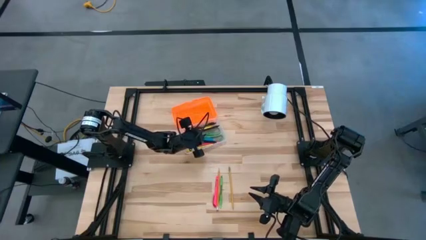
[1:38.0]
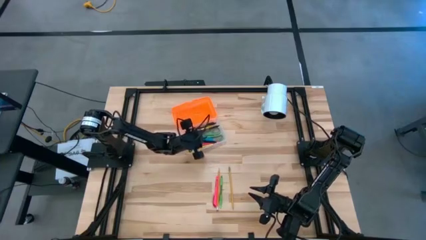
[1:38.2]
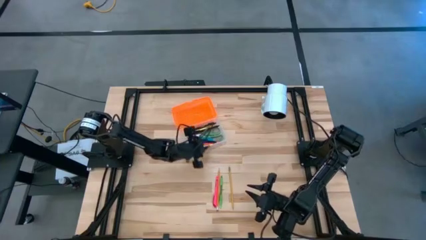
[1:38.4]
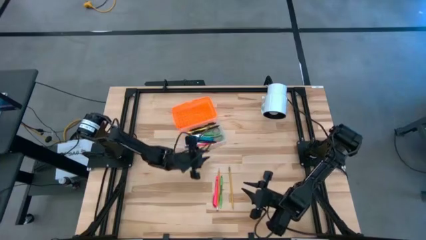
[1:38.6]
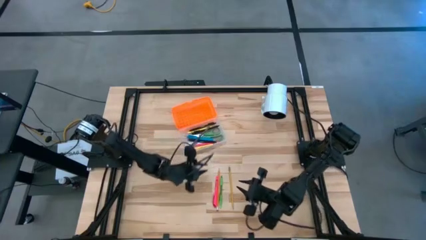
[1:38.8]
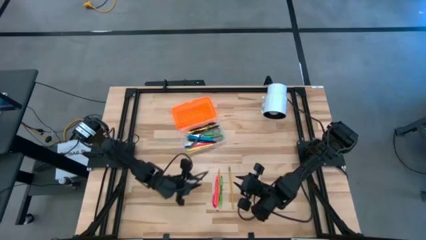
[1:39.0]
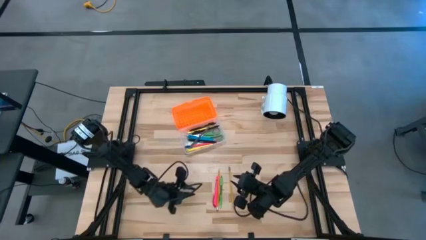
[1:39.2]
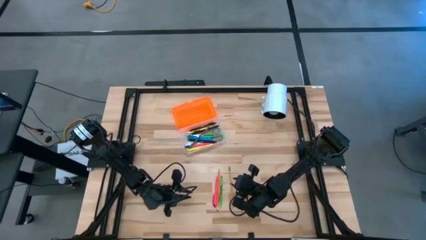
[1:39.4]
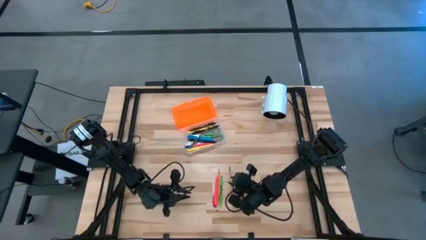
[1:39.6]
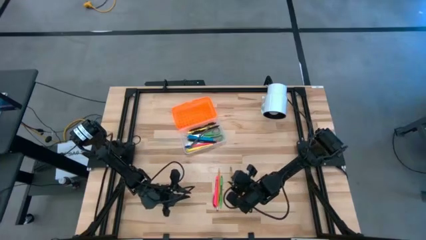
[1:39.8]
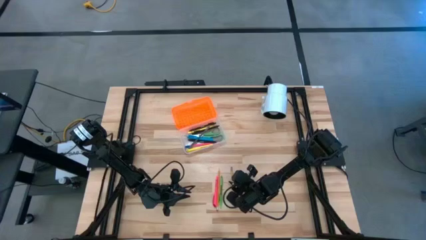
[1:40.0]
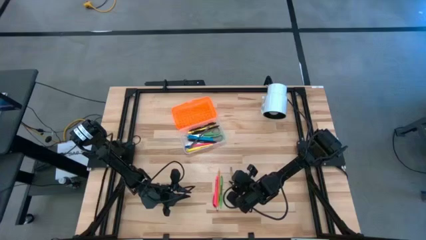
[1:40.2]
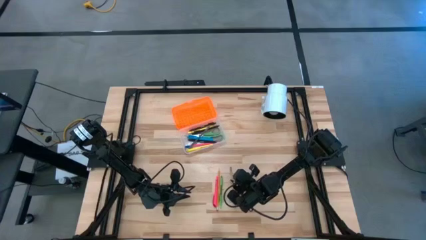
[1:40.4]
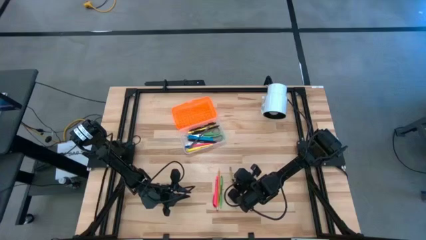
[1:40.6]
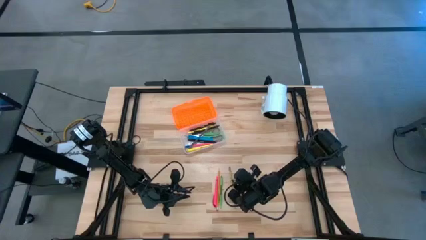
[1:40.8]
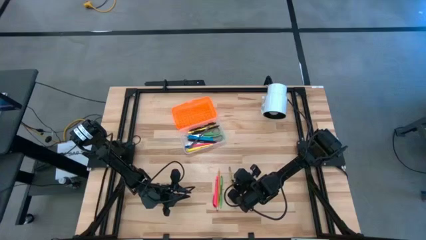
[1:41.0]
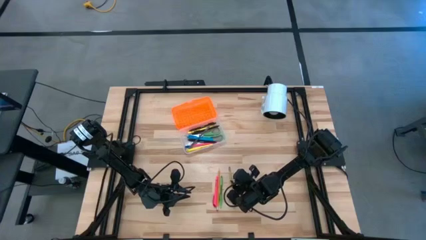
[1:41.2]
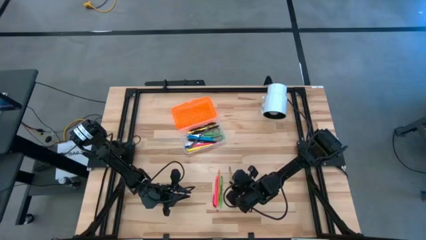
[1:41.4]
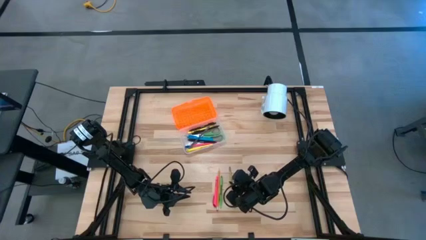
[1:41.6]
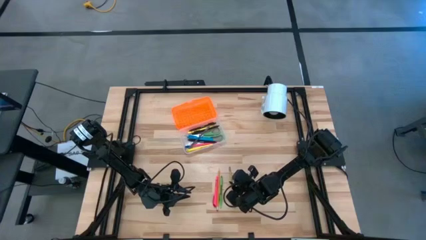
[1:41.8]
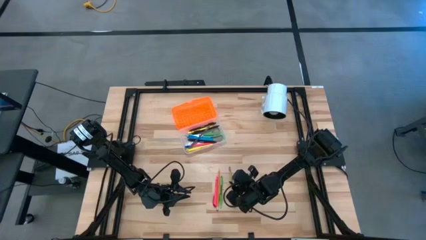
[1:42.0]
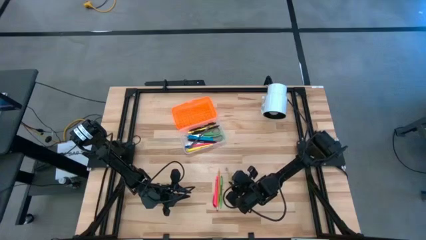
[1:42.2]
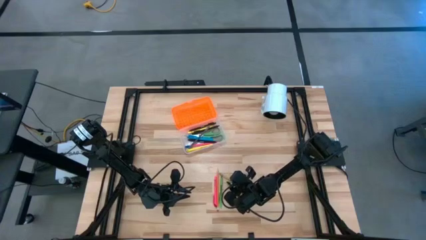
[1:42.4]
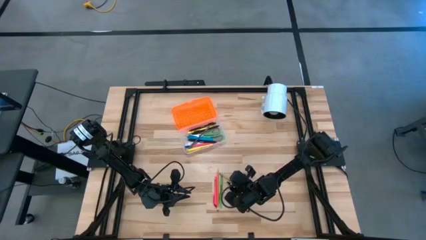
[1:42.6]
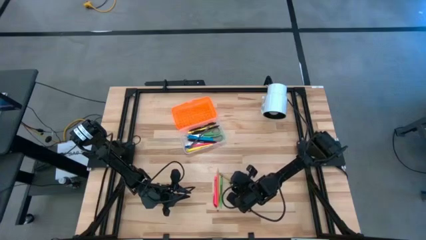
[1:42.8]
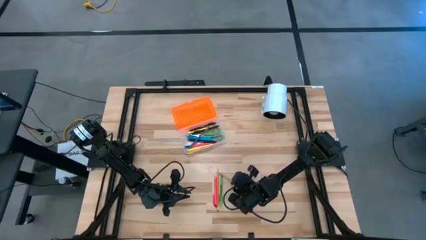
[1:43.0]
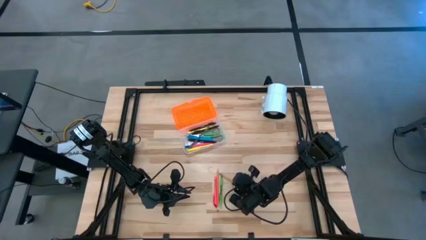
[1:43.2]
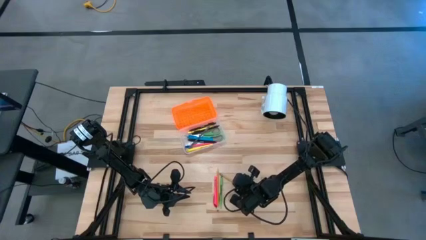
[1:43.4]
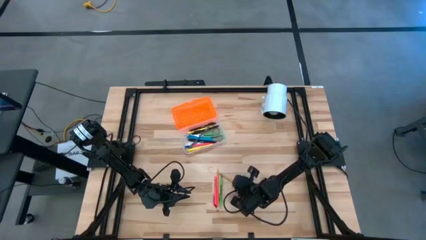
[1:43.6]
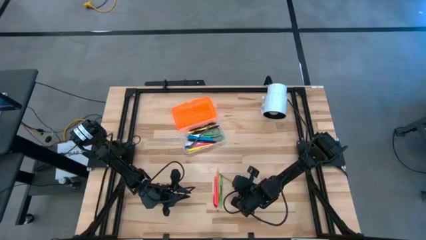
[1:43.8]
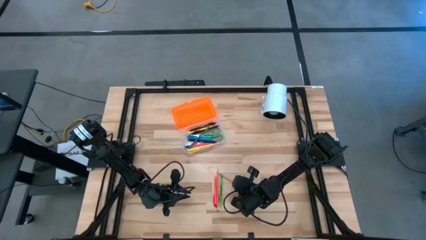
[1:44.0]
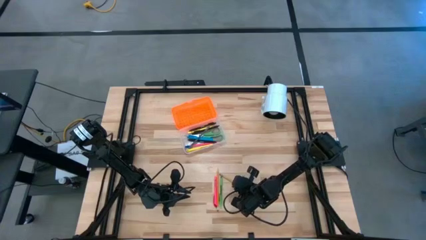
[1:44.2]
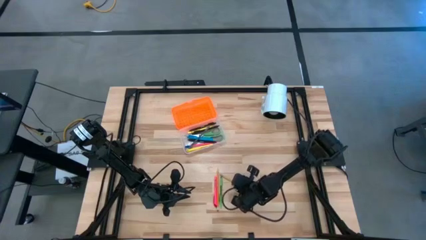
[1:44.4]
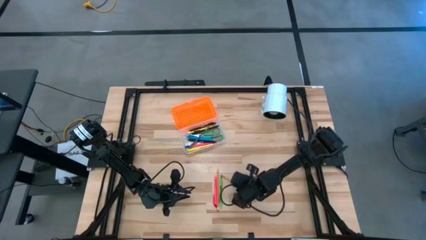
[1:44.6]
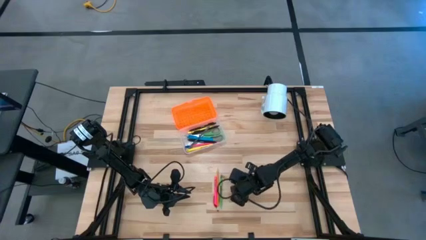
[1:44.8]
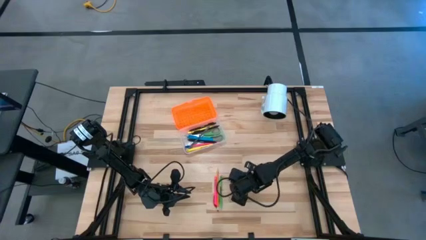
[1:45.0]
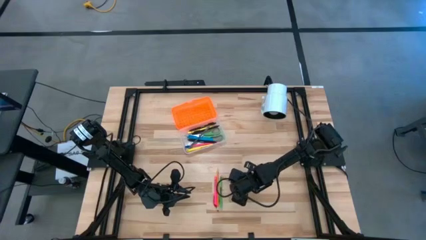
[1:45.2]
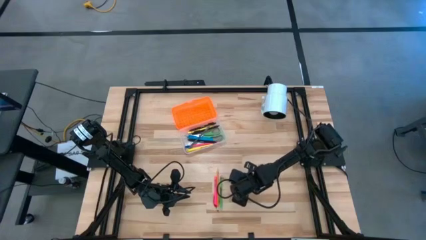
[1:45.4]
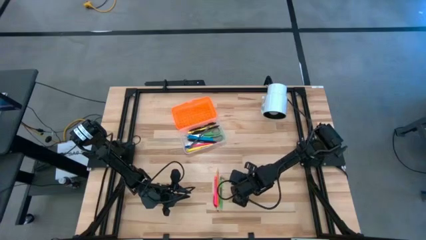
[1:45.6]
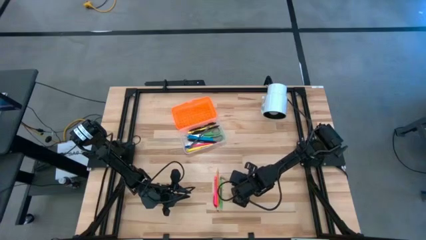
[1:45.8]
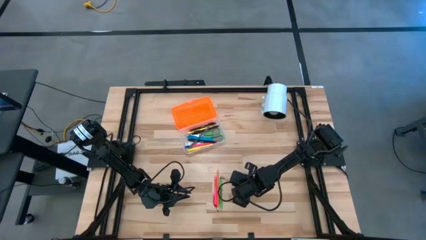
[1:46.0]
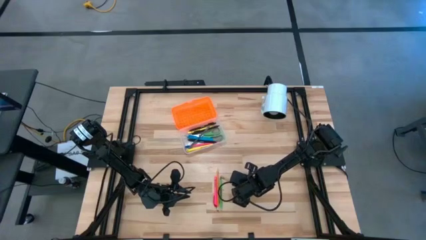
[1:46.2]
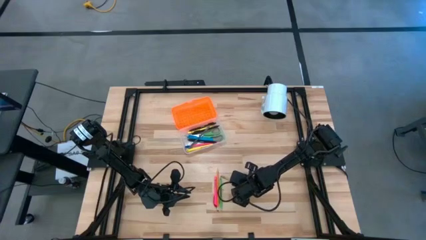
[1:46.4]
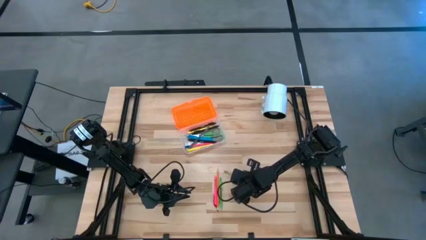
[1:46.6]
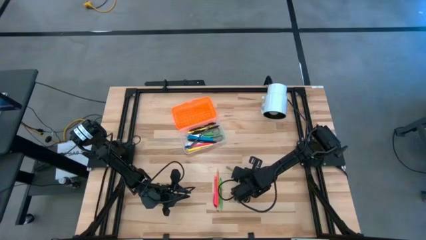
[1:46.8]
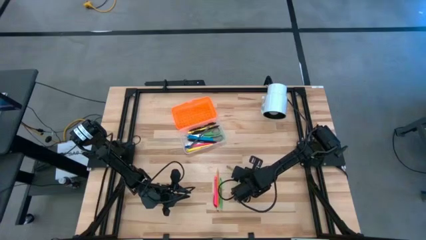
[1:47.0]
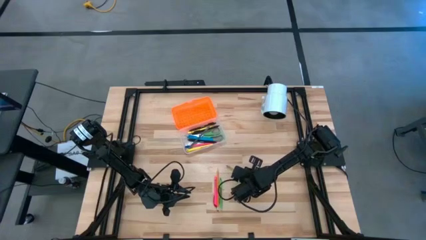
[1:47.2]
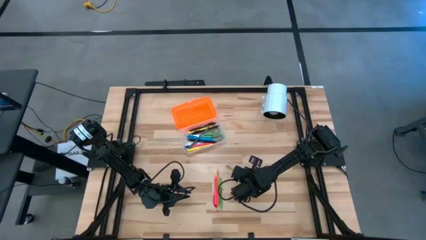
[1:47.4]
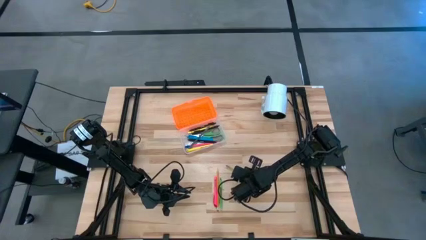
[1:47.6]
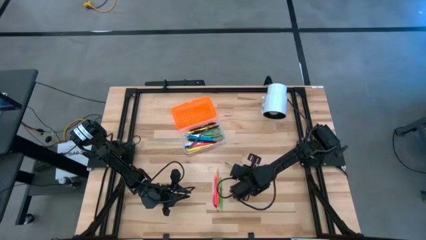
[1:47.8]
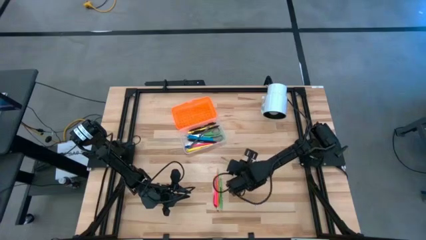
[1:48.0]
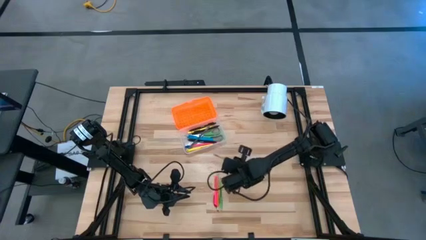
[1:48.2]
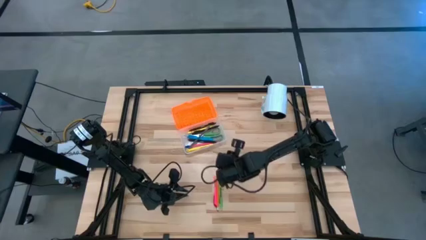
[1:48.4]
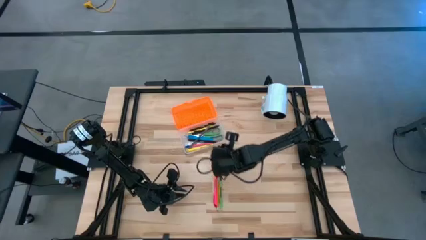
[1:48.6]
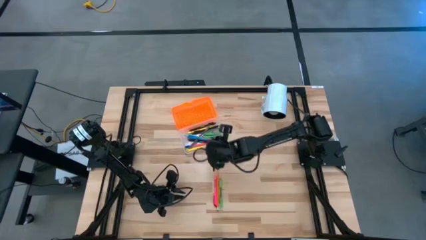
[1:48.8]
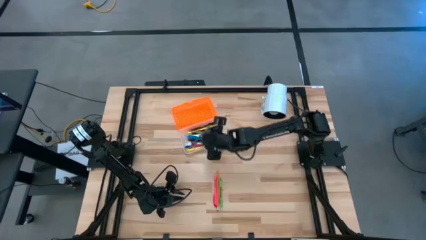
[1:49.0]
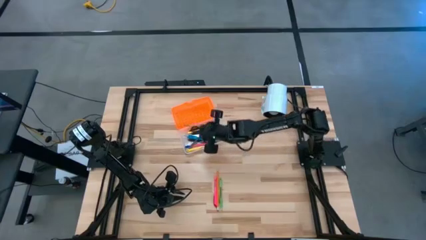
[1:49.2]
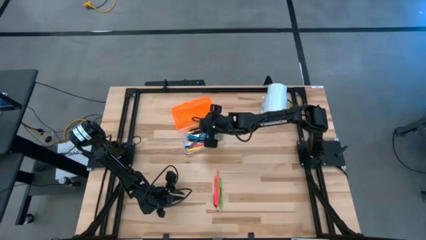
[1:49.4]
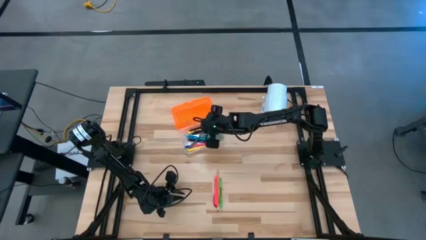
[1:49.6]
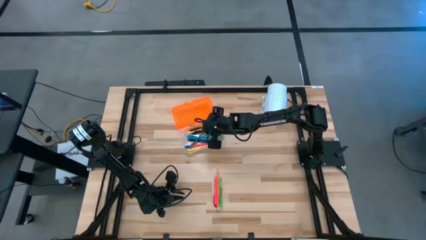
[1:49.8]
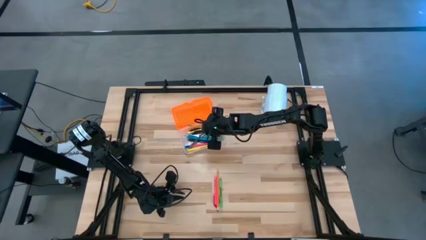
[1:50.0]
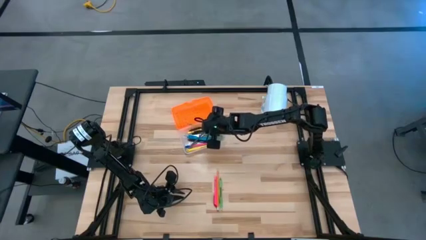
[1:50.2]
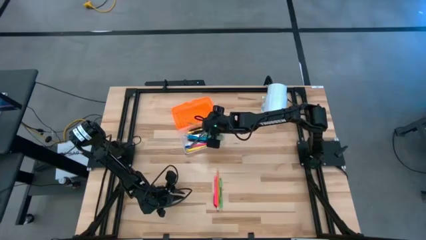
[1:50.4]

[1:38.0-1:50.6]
Task: Pick & place school supplies into a supply box
Put the yellow pencil into the supply box

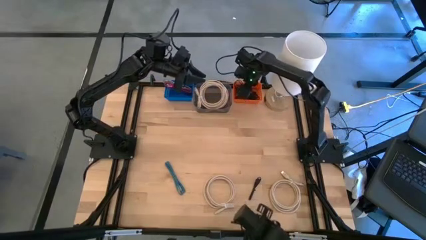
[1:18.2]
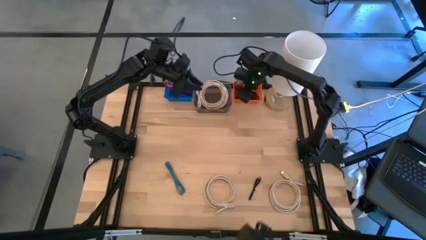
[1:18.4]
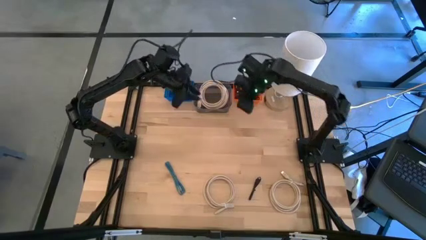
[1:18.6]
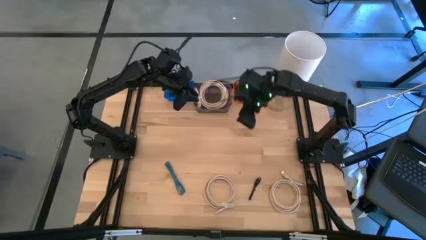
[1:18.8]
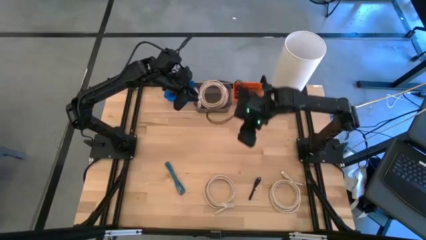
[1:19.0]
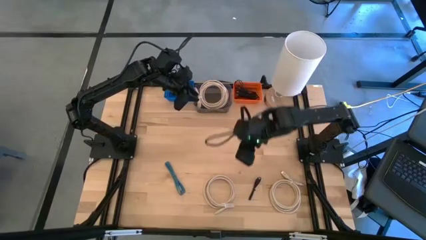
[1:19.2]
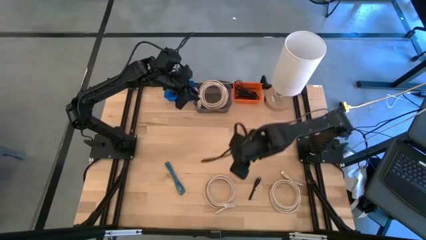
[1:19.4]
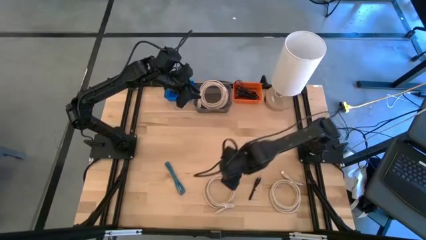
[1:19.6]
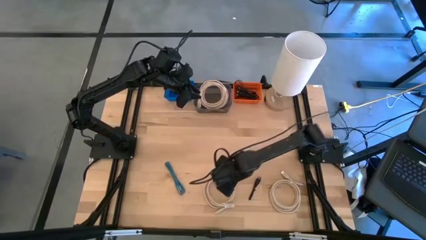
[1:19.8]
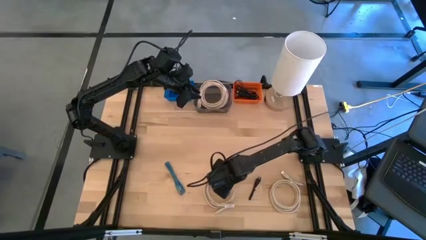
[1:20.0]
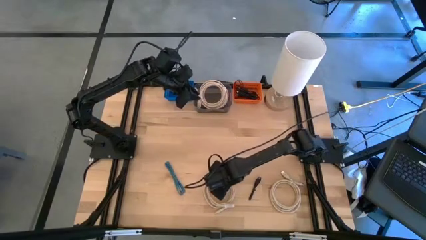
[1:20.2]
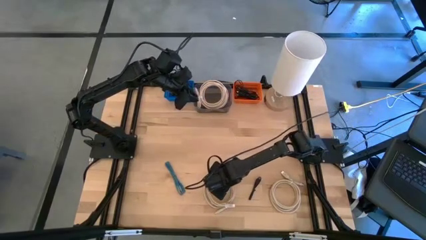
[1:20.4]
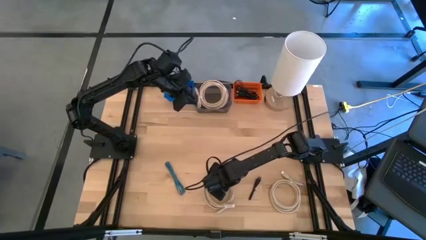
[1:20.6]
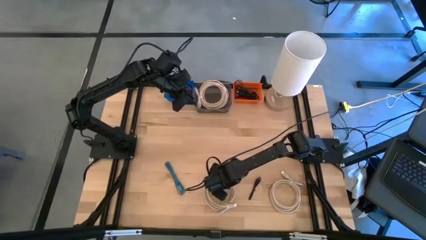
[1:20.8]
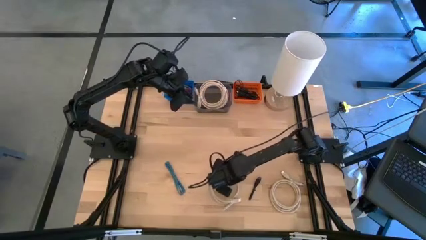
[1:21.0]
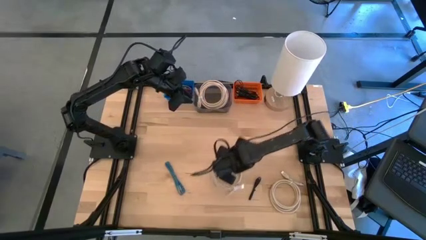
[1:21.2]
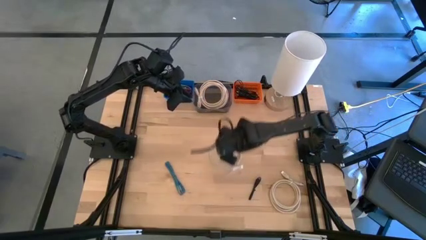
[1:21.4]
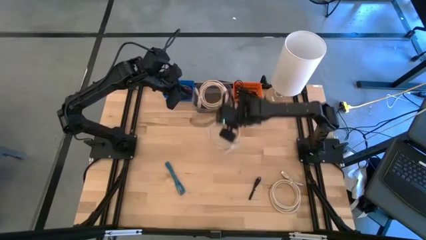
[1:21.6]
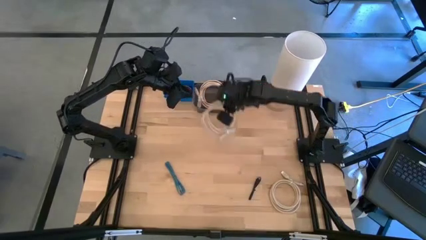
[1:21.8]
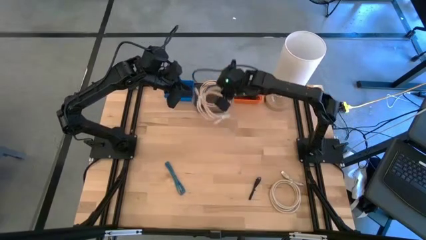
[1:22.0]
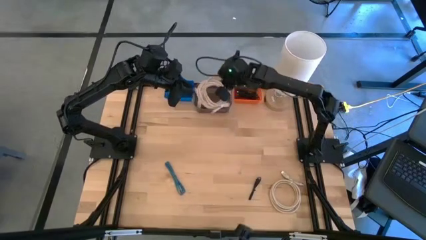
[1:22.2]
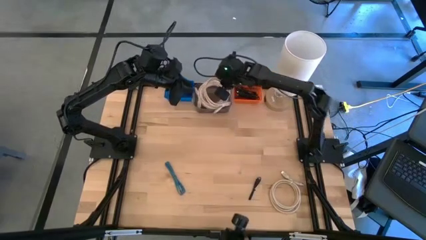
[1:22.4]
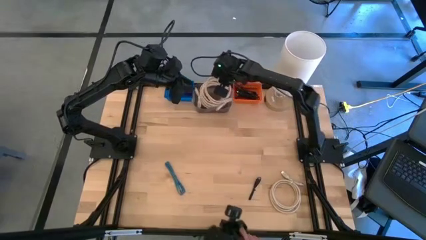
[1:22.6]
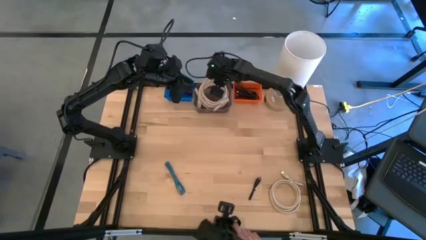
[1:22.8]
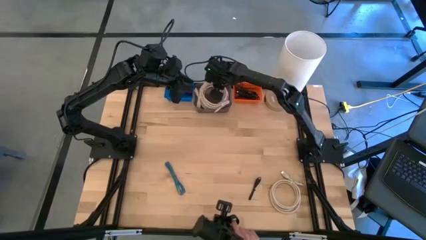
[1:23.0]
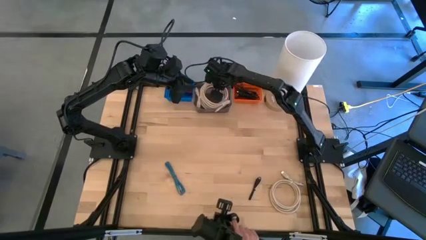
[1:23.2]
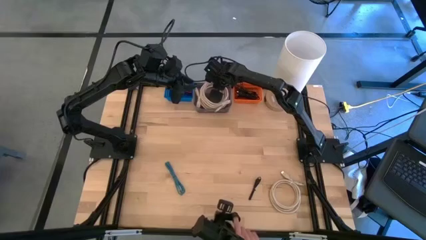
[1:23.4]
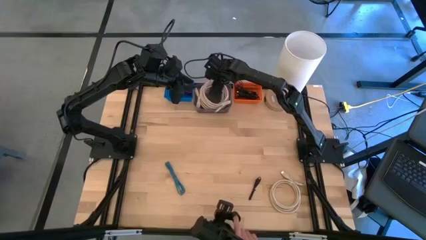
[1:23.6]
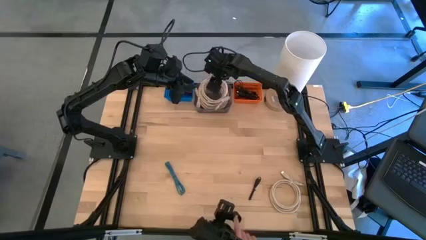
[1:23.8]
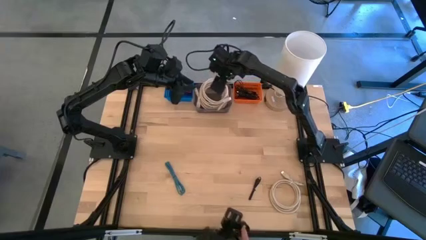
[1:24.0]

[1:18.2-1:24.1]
Task: Pick & Place USB Port
Put the brown HDMI cable into the black bin
